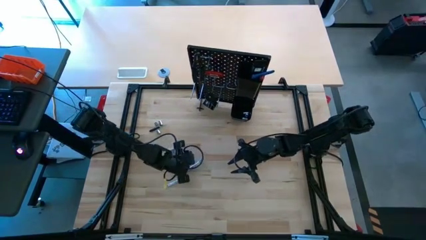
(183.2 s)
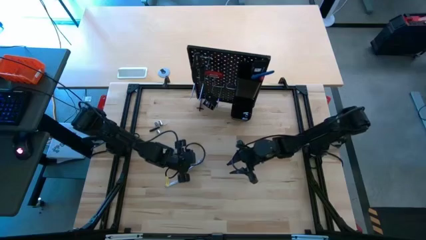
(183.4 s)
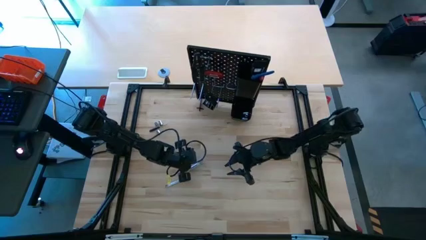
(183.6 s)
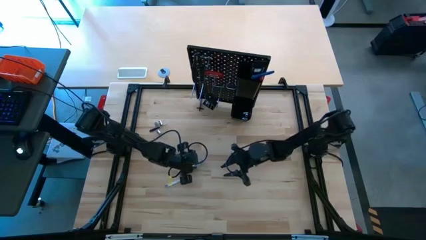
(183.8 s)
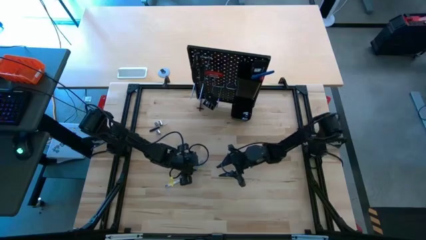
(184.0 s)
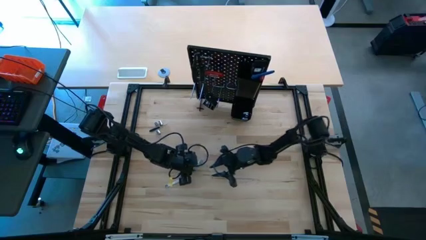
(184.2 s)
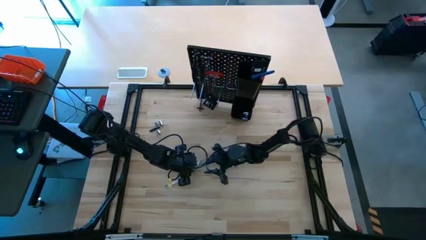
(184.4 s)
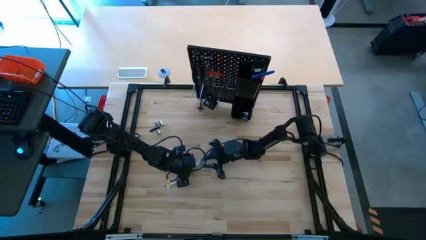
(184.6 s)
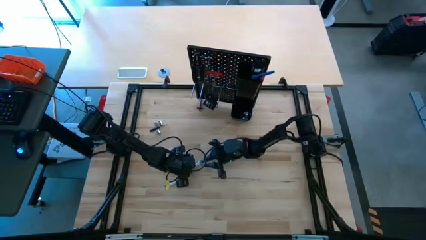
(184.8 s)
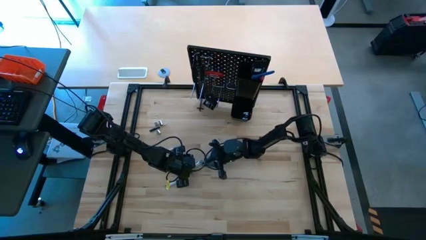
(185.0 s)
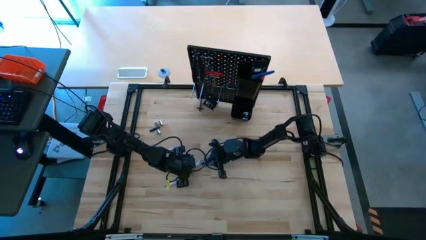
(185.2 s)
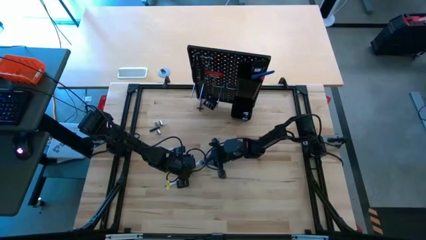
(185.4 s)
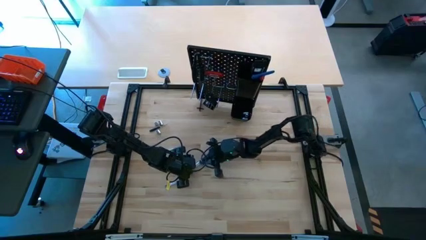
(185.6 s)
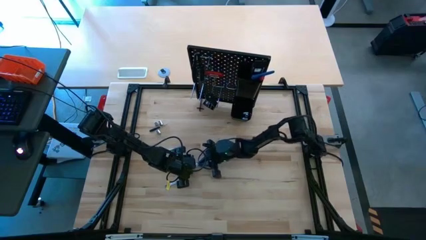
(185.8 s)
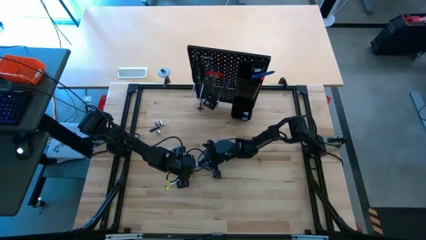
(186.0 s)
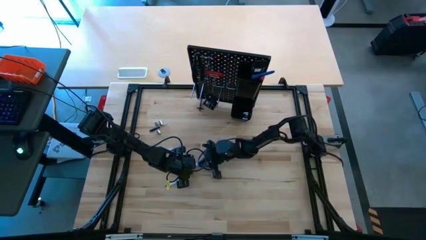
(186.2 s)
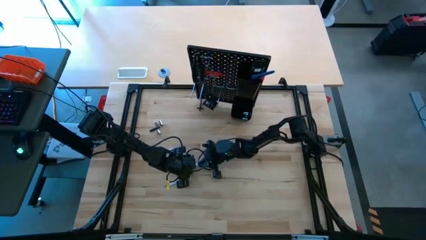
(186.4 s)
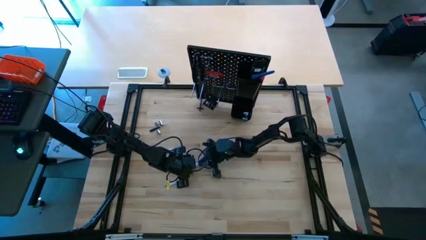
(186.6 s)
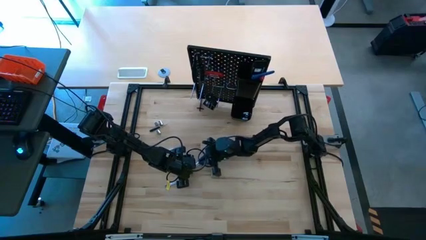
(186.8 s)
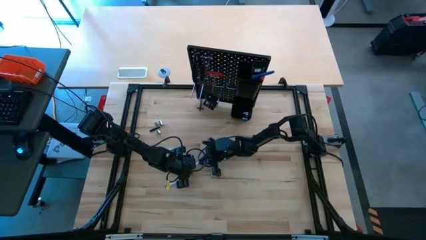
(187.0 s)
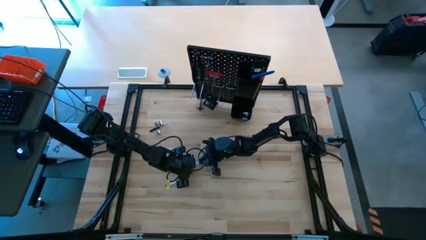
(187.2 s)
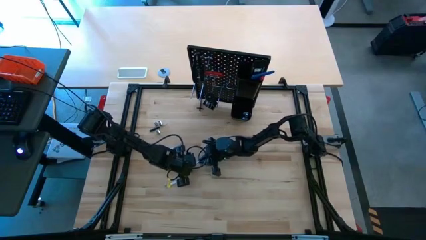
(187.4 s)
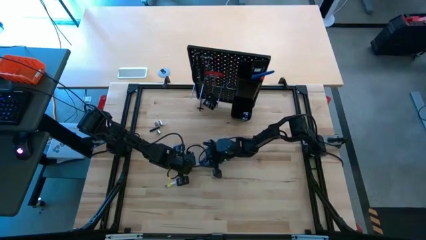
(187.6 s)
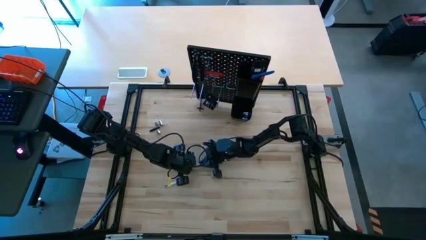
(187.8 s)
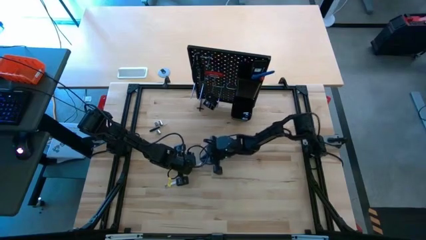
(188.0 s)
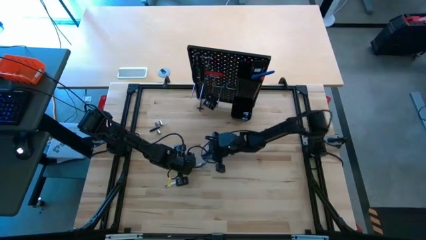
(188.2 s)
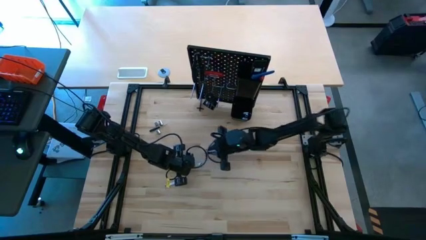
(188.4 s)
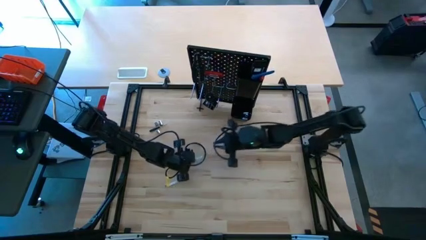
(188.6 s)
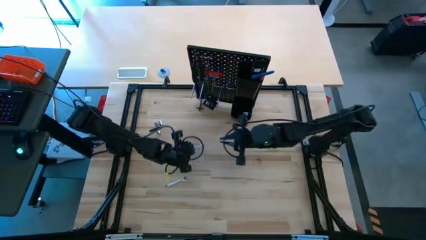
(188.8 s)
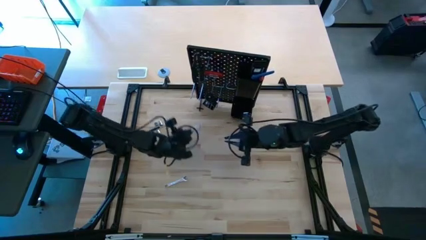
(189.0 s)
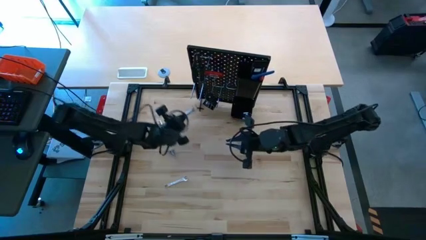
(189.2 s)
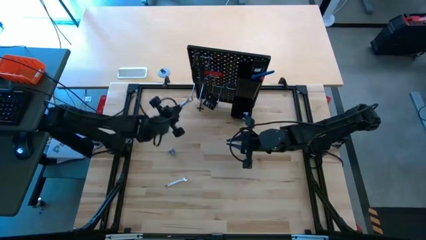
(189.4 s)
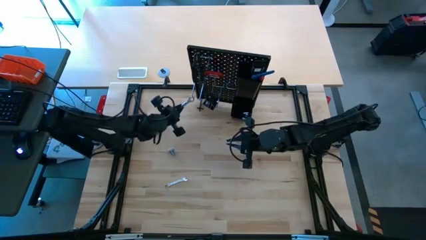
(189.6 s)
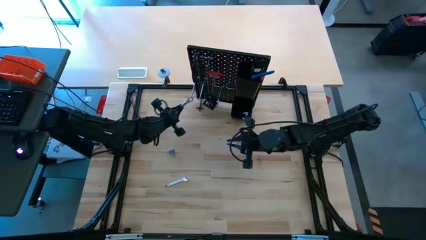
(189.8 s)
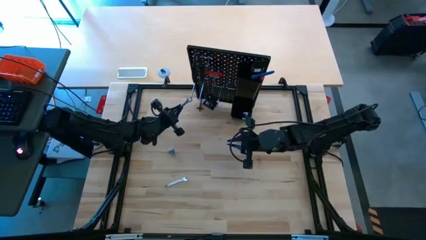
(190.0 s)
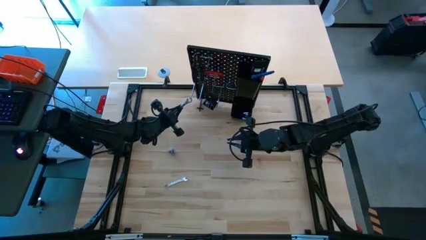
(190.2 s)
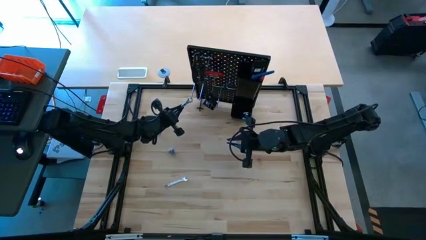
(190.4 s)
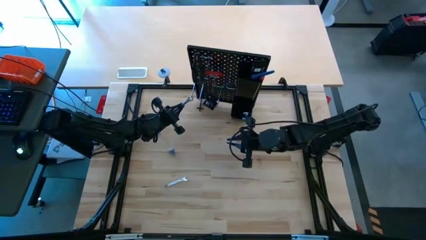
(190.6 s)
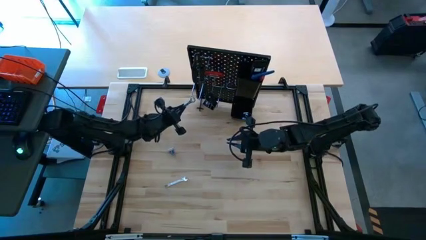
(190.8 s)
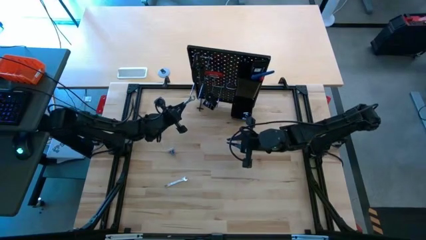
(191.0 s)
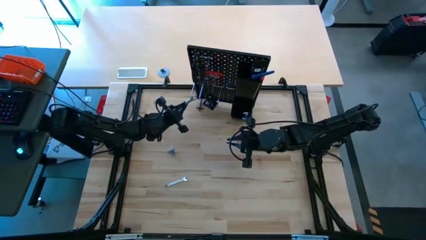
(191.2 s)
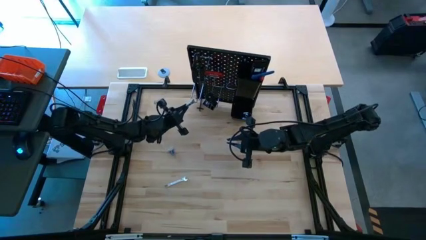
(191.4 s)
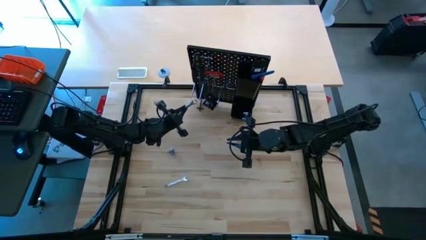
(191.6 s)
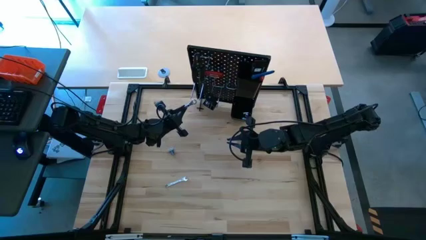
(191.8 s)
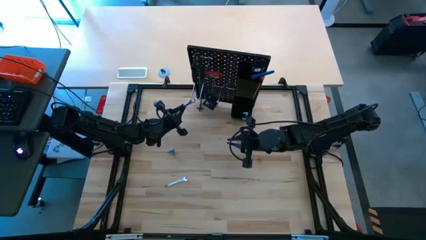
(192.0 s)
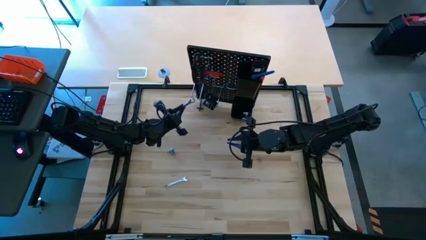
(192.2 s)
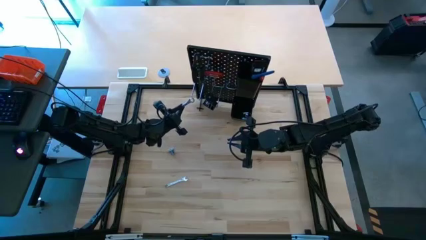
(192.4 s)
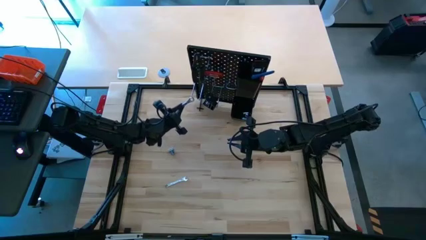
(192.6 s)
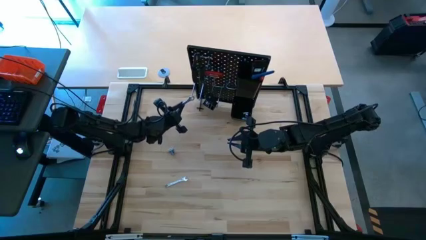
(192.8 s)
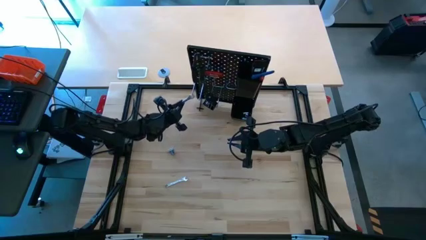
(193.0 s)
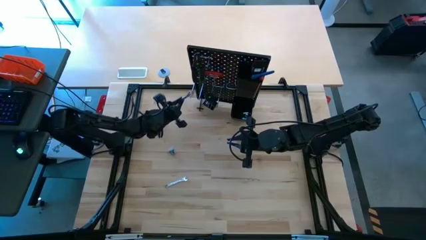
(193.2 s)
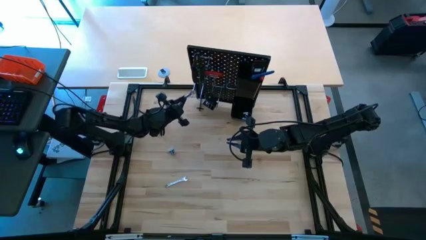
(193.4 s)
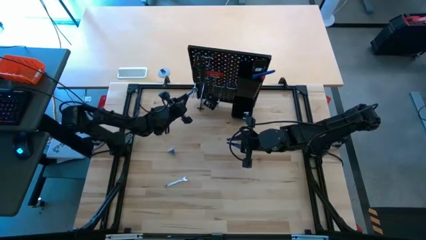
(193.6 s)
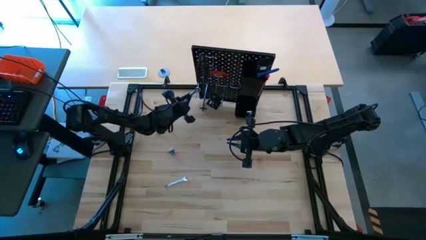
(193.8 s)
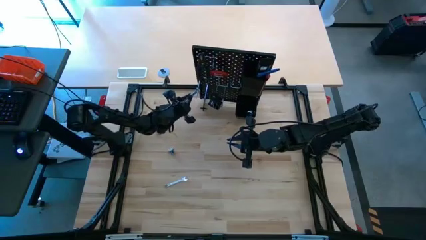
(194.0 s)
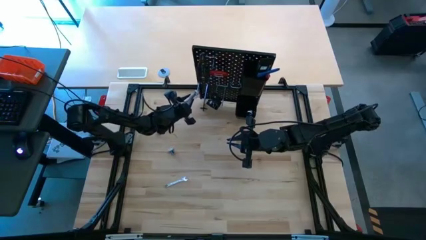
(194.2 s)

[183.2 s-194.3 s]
Task: Hang tools onto peg board
Hang the wrench on the peg board

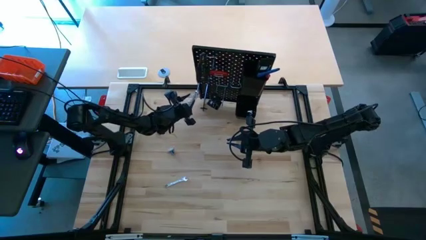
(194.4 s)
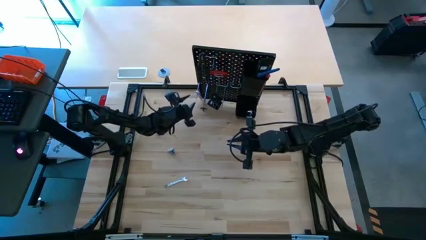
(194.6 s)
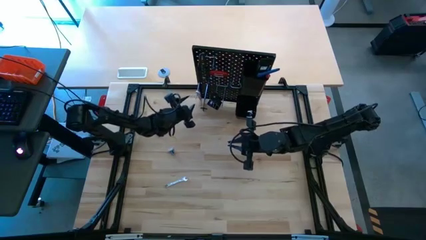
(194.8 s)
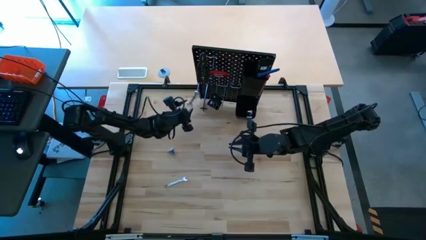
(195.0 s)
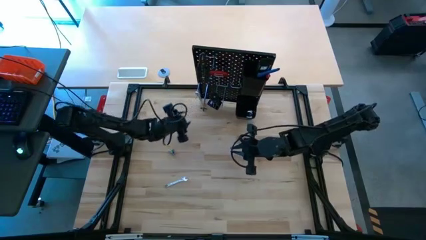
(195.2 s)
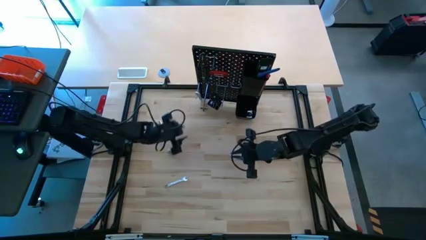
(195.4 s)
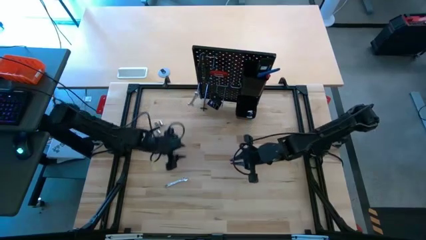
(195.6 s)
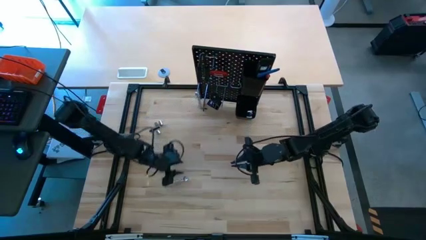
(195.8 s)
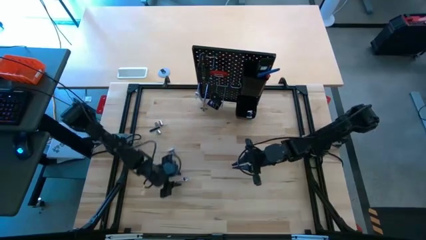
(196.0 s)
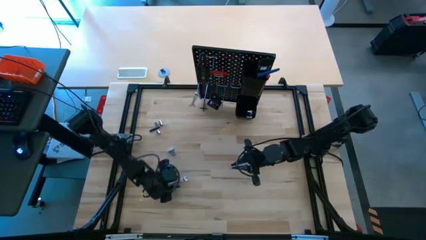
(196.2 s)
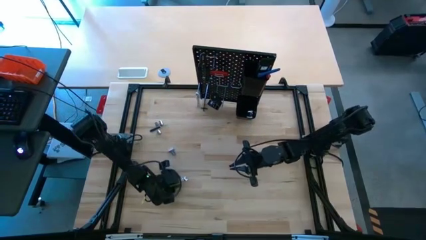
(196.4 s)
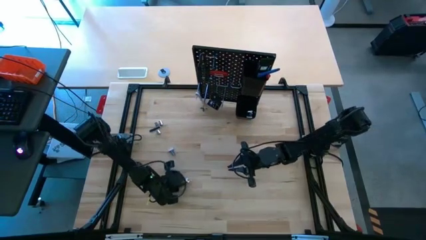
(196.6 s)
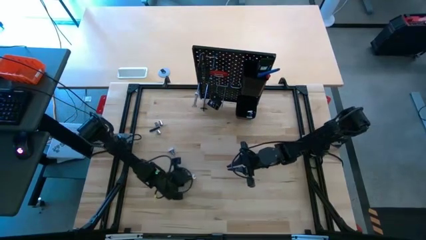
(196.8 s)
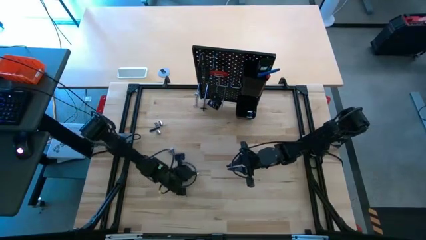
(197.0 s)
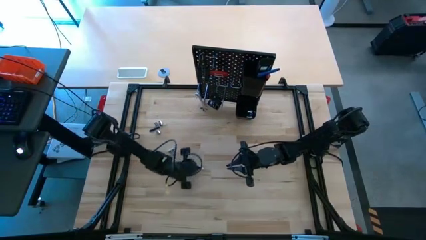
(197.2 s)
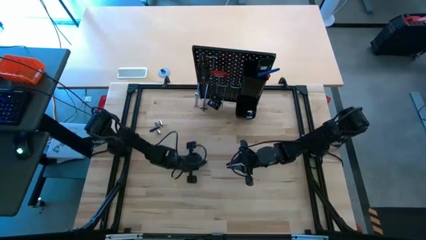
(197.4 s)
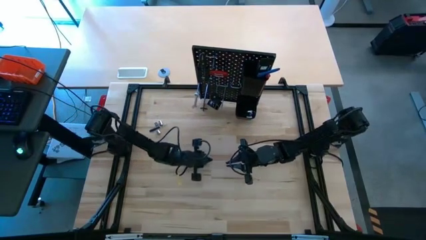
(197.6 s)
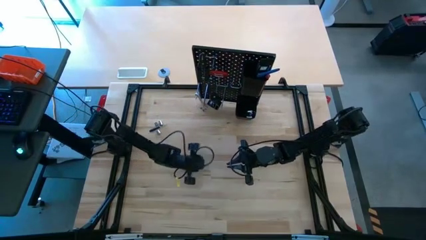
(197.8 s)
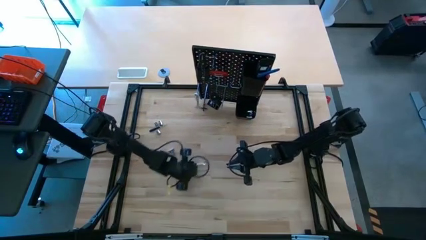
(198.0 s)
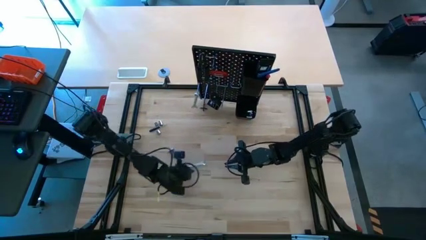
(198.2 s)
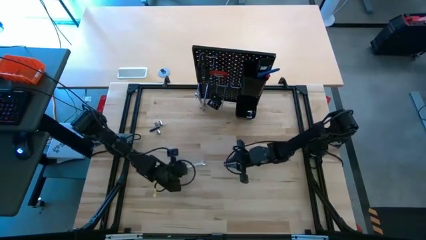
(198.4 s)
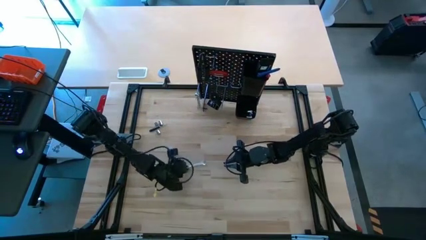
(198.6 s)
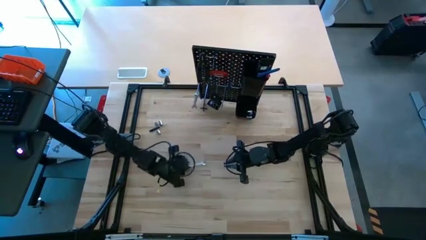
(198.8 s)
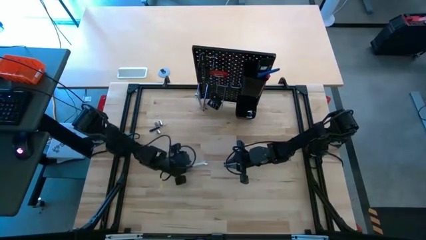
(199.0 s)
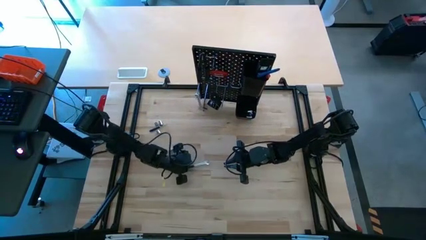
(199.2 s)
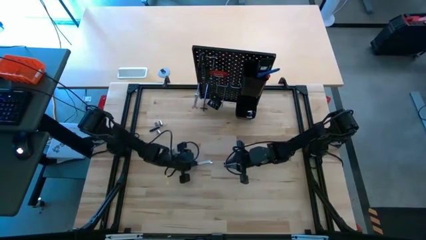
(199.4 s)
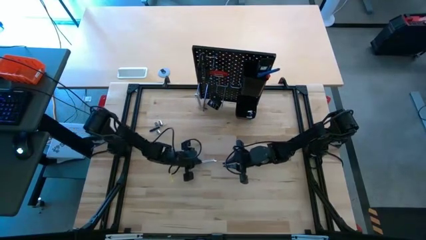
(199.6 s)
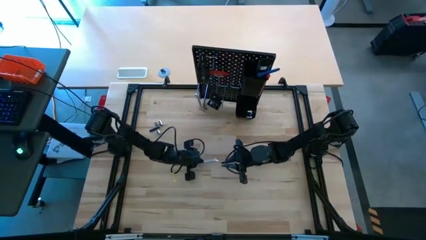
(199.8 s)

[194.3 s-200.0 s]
Hang the wrench on the peg board
